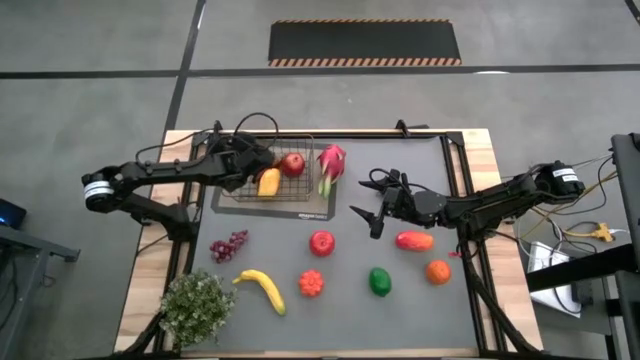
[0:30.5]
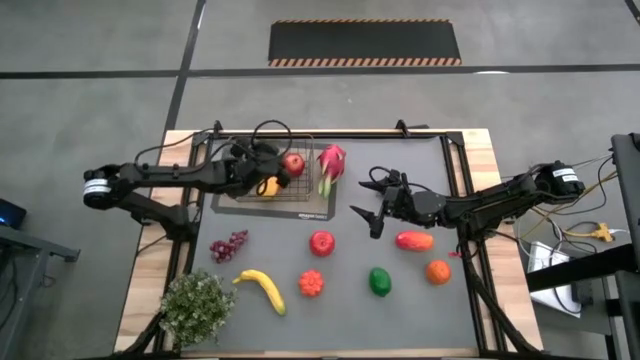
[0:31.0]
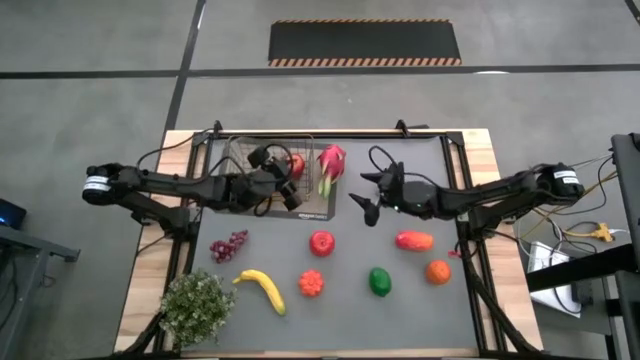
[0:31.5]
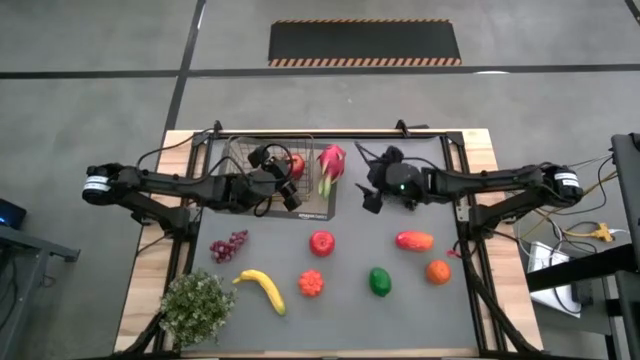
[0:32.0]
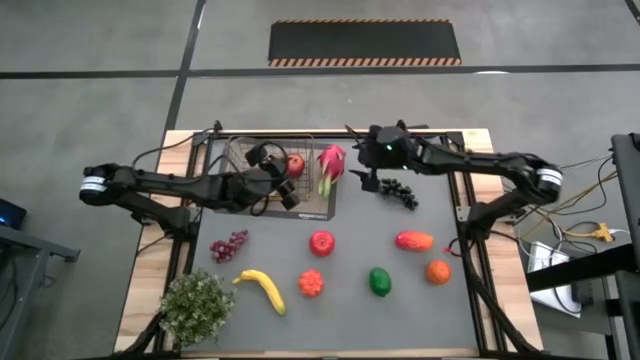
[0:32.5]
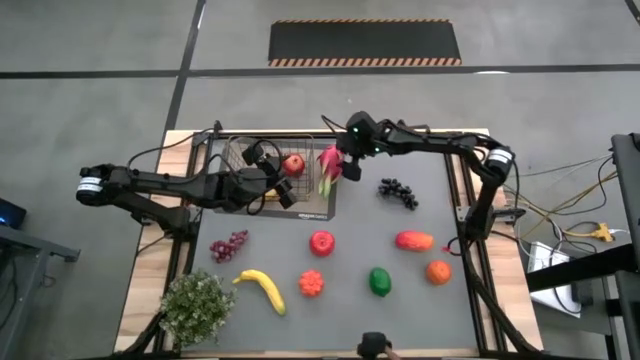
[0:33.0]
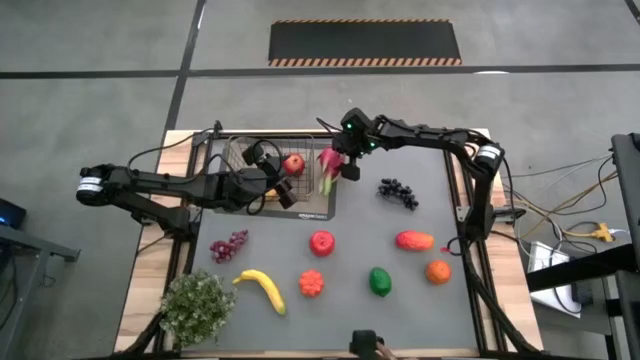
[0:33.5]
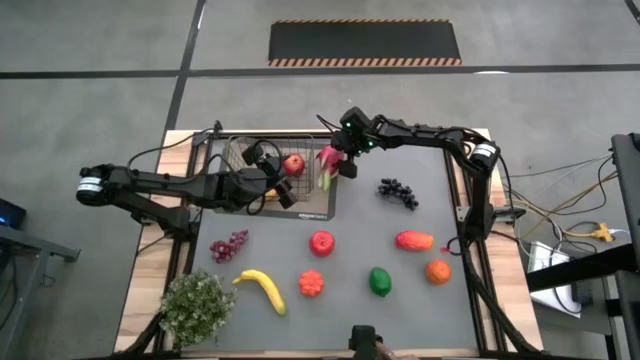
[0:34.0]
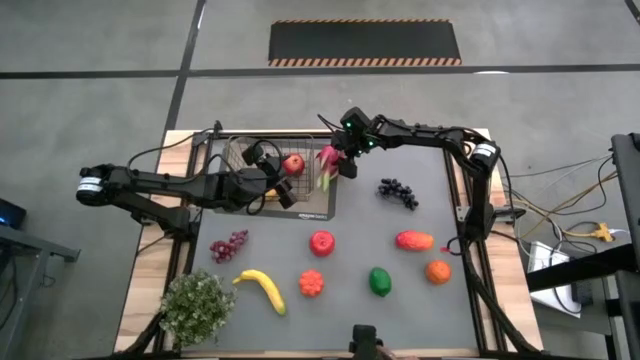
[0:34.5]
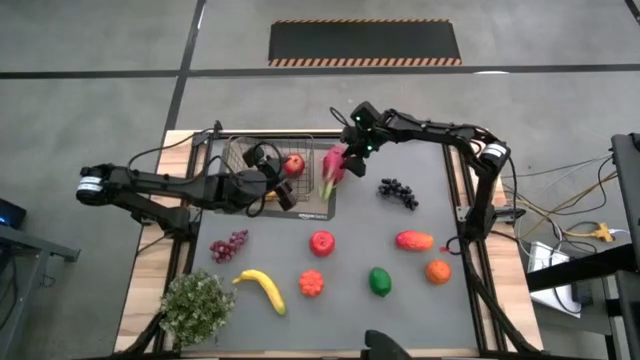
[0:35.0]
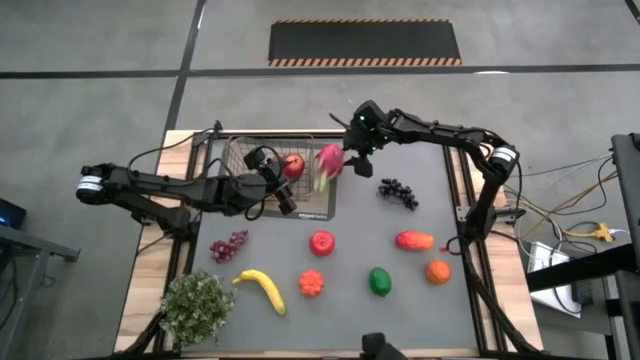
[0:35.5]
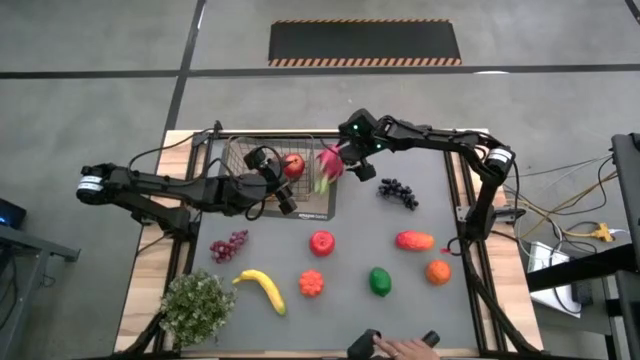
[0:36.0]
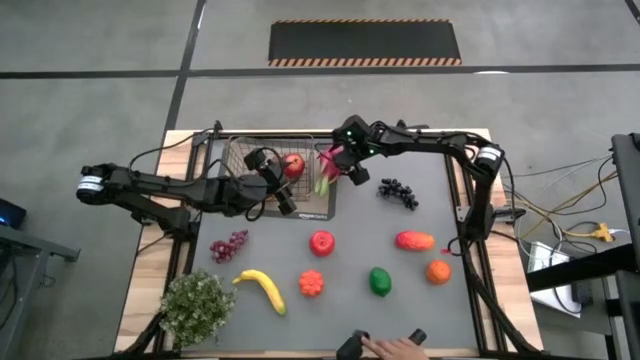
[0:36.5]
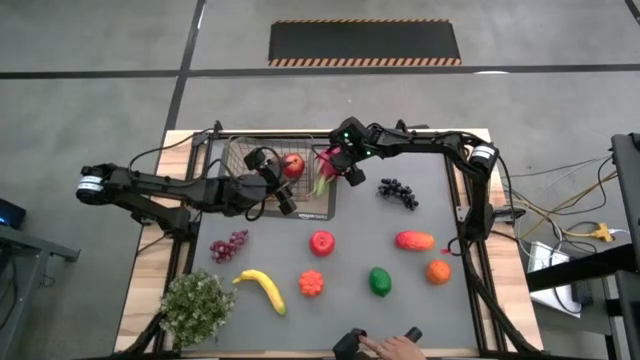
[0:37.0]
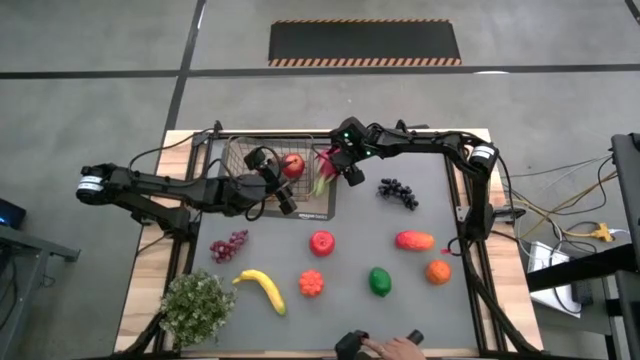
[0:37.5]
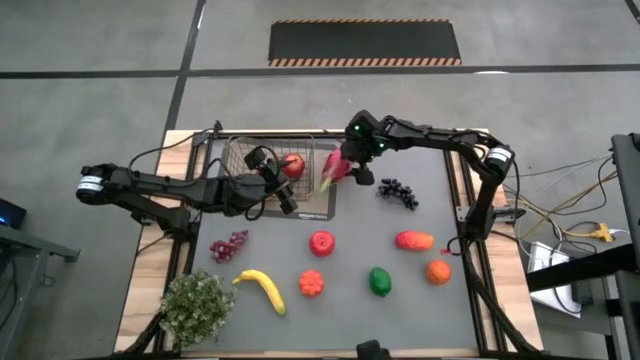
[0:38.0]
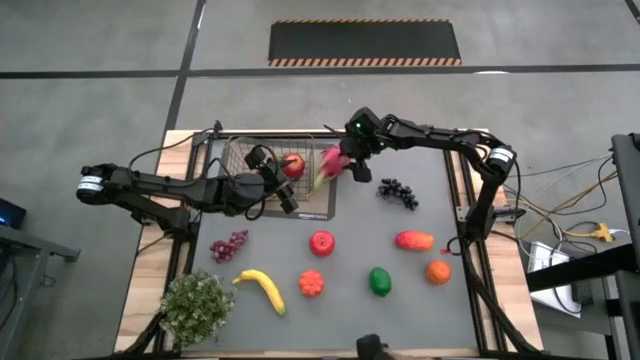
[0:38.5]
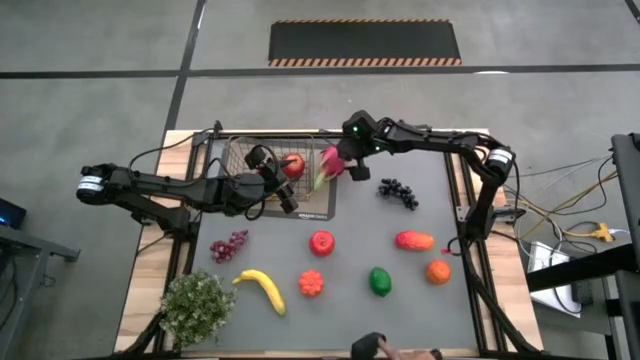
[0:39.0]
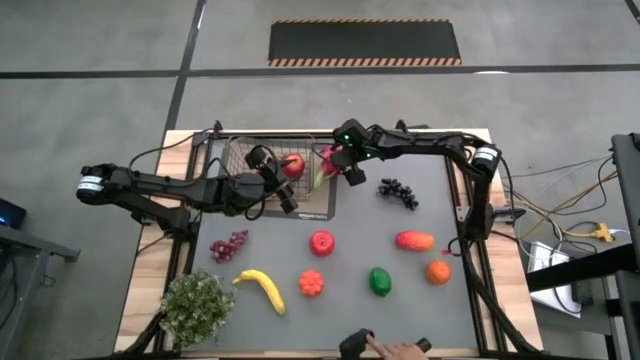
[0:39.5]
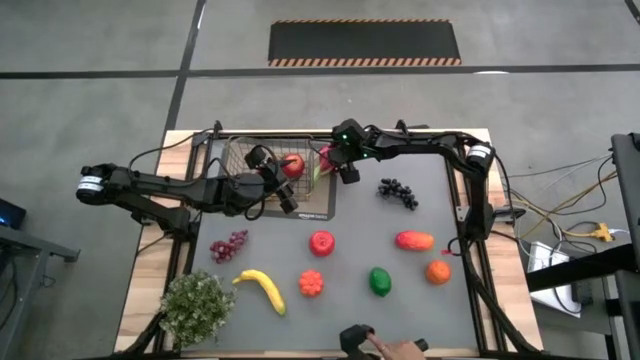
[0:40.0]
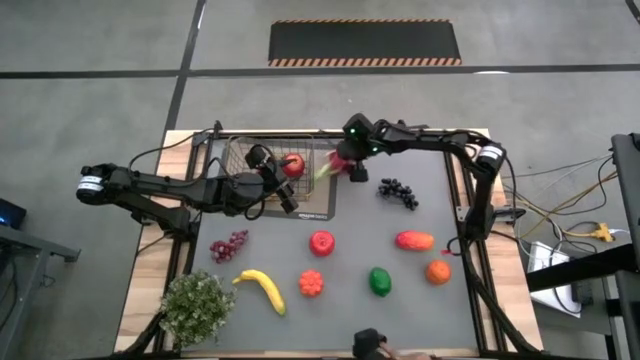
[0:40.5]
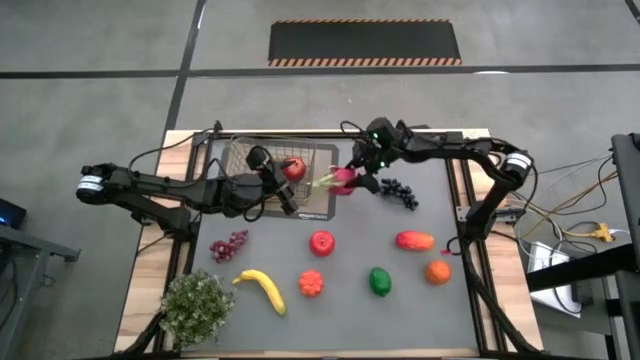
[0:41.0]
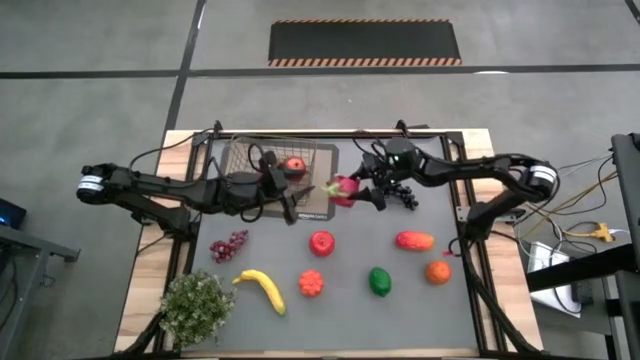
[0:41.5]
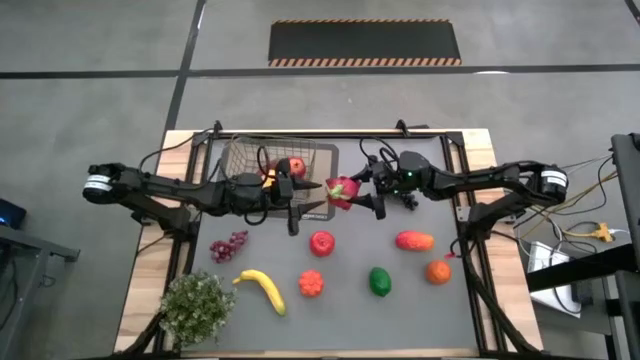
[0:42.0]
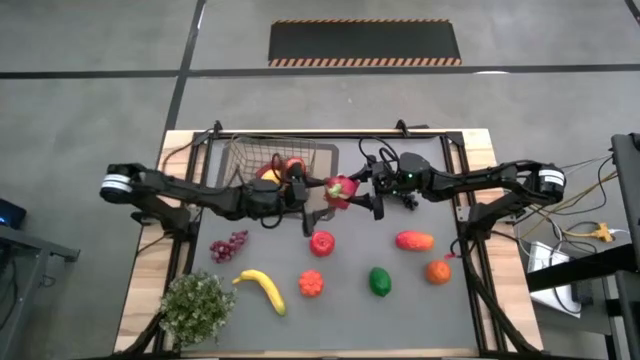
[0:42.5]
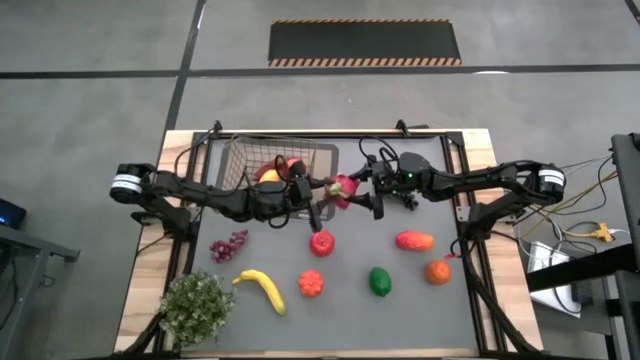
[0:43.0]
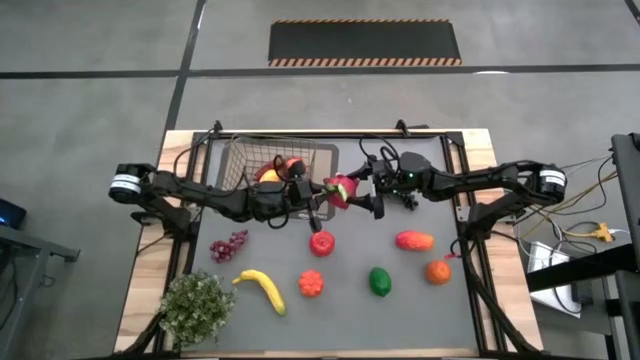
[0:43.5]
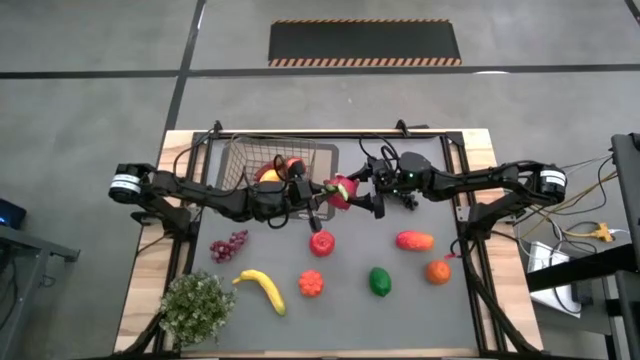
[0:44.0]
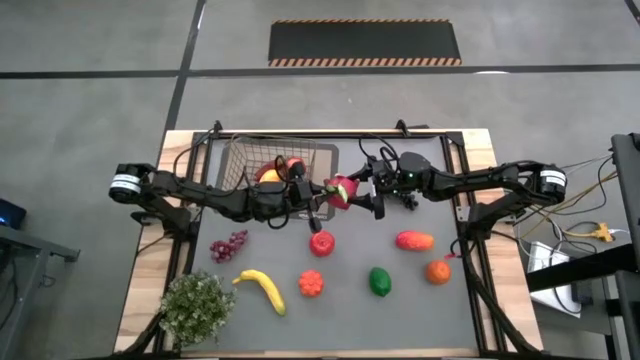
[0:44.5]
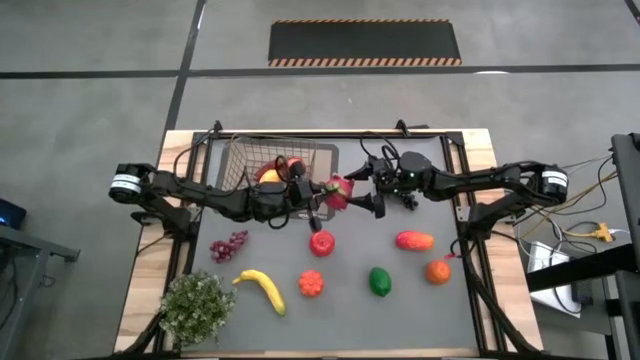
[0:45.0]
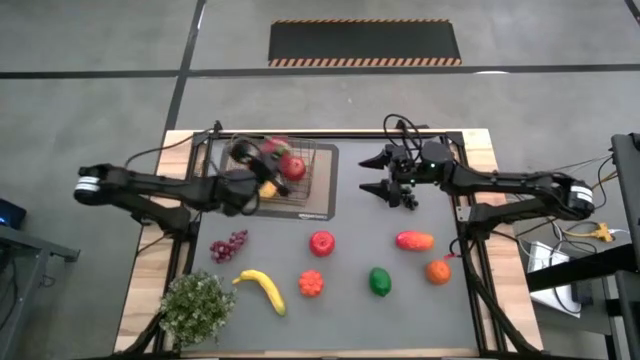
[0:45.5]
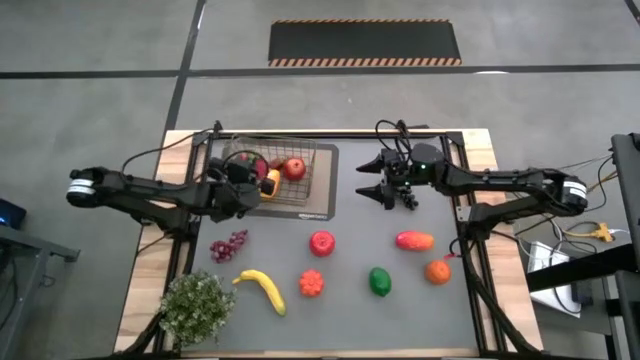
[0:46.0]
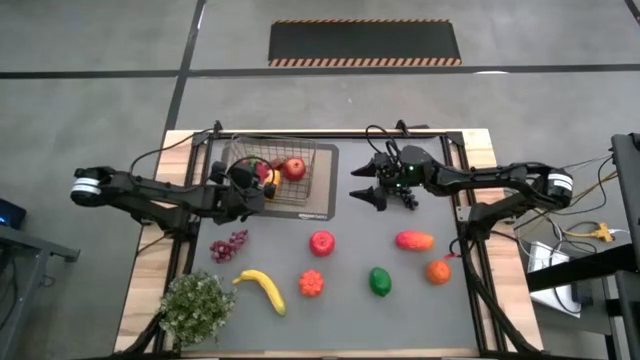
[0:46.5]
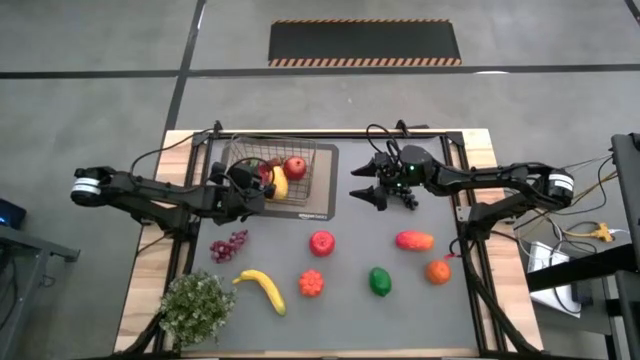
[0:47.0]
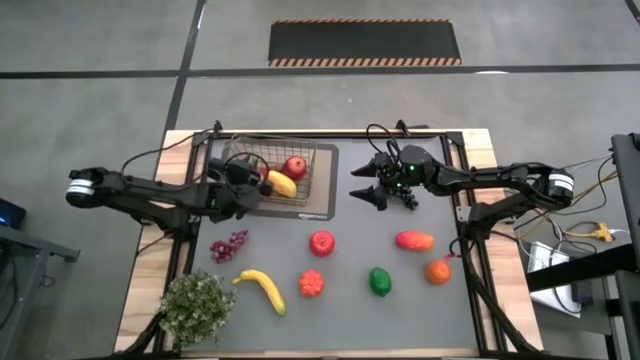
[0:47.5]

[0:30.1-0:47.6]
Task: Build produce basket
Put the pink dragon fruit into the wire basket

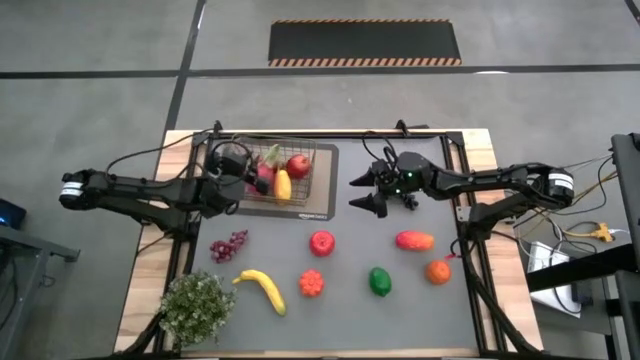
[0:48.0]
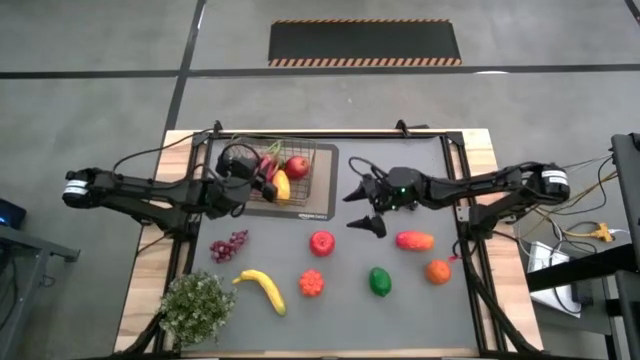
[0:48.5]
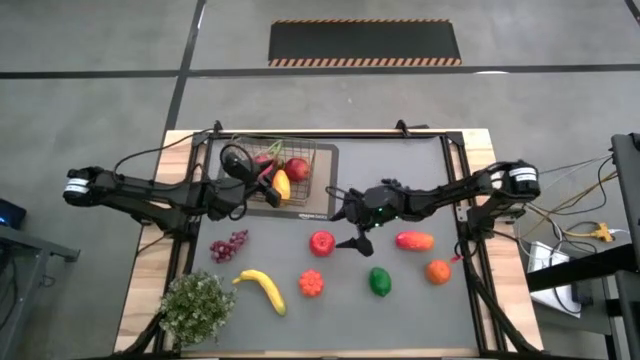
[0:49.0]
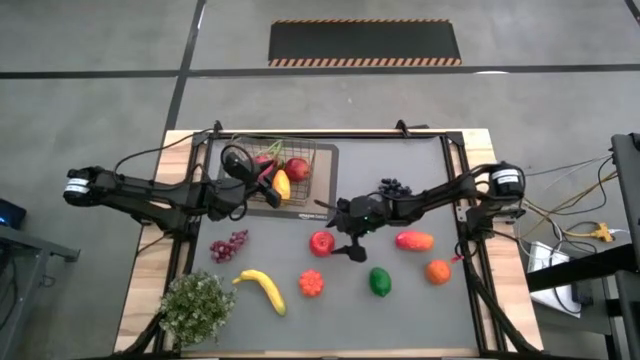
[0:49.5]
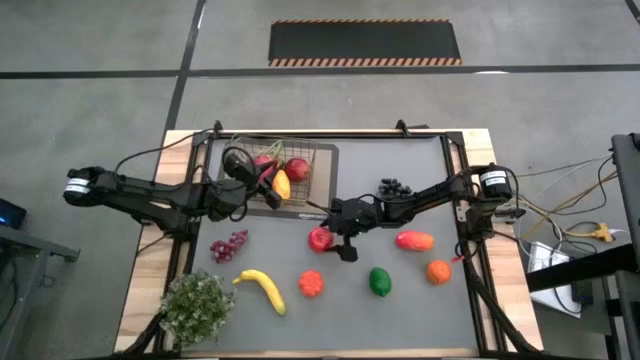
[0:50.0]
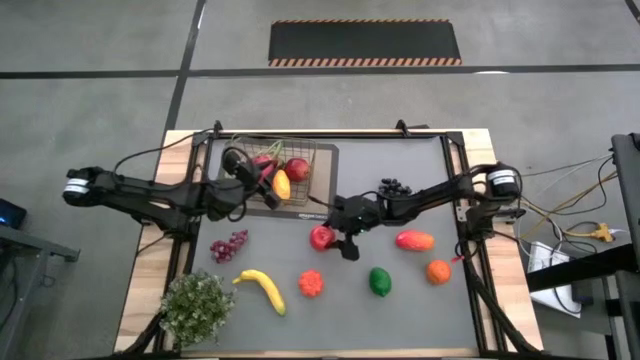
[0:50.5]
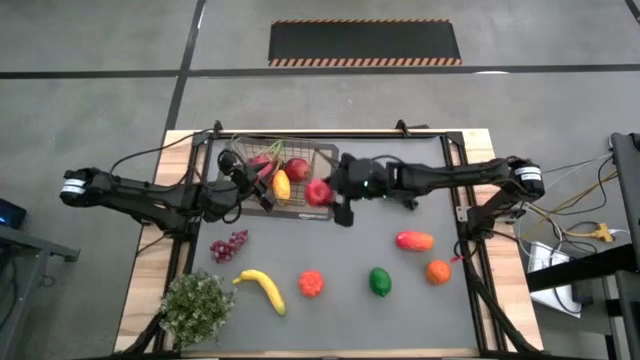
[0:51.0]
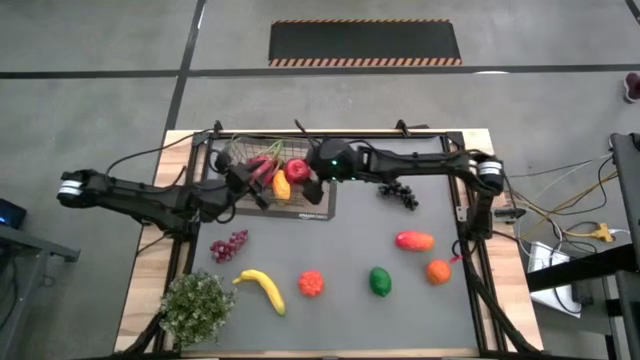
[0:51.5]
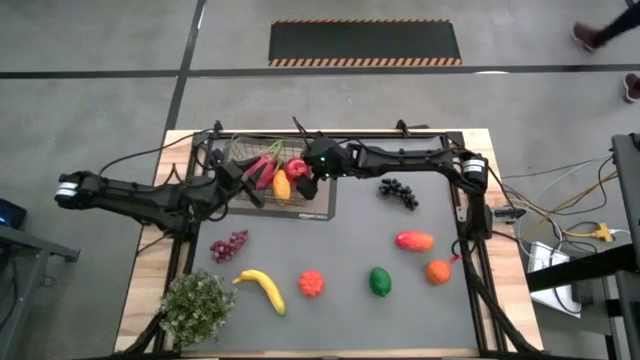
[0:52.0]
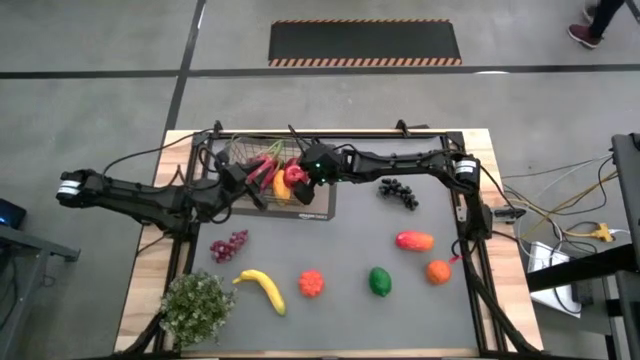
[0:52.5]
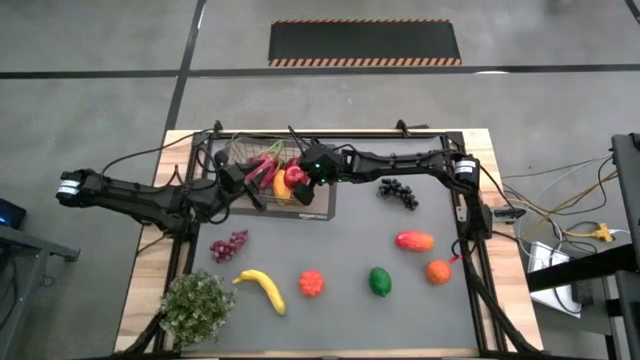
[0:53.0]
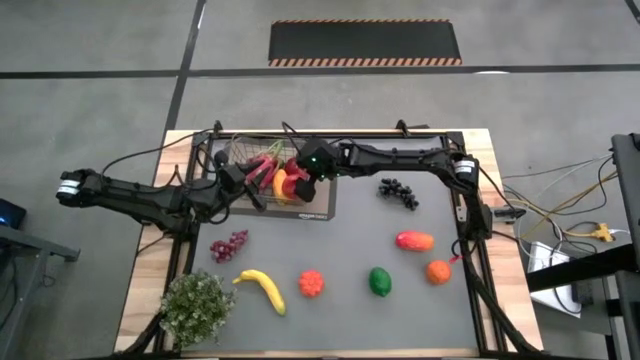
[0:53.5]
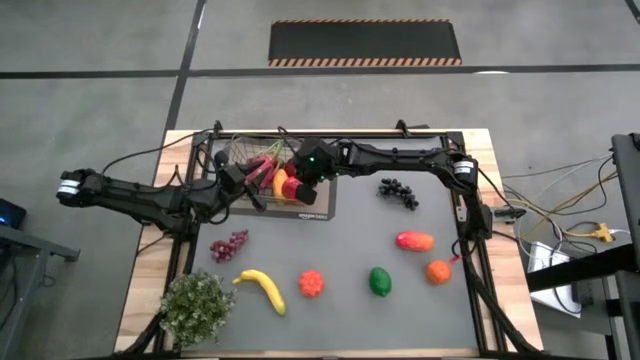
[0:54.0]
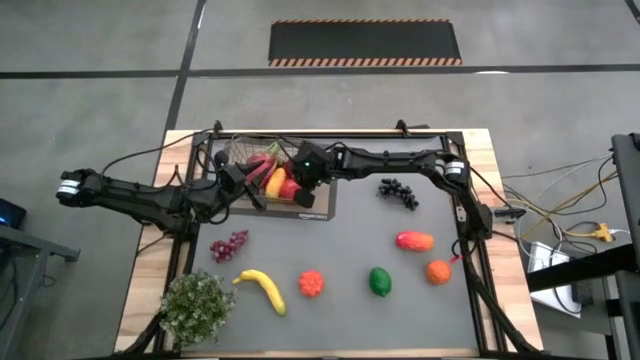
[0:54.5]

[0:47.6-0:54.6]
Put the red apple into the wire basket
